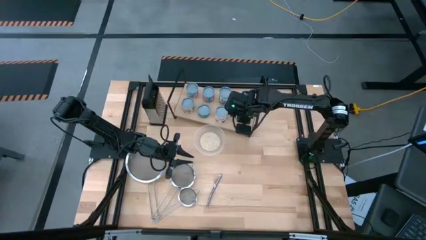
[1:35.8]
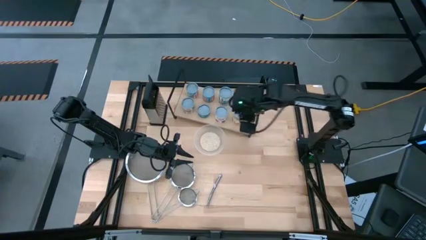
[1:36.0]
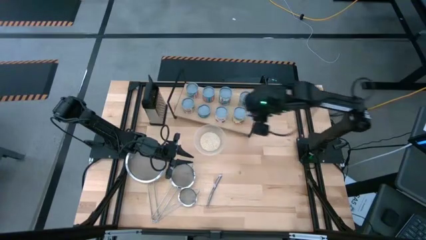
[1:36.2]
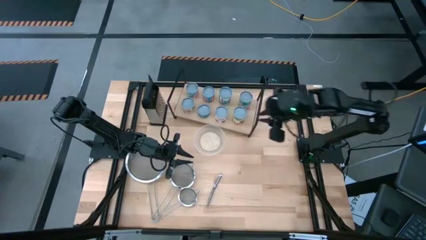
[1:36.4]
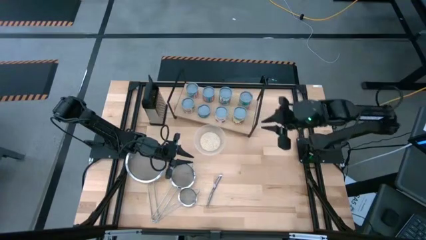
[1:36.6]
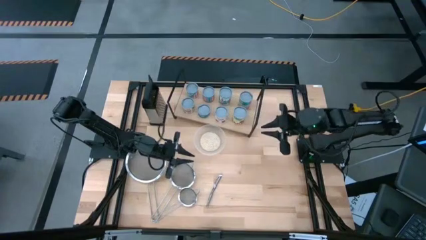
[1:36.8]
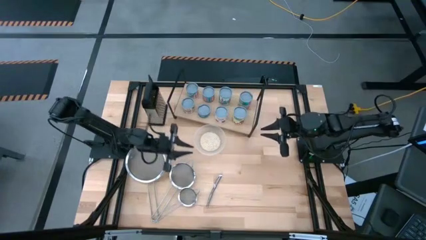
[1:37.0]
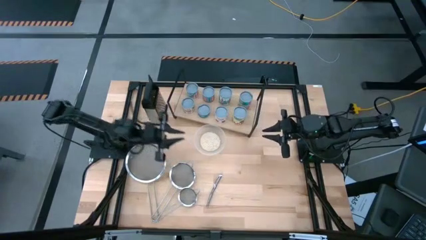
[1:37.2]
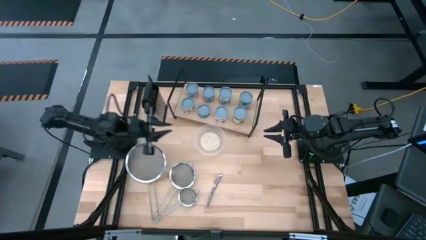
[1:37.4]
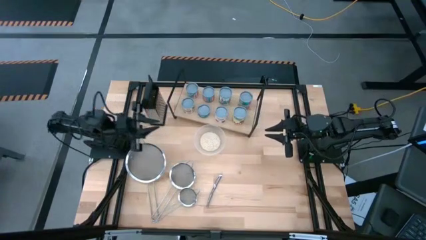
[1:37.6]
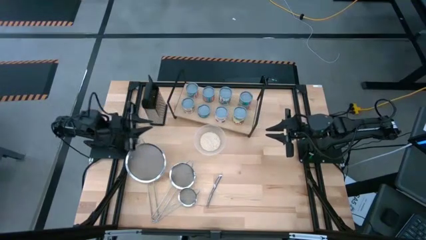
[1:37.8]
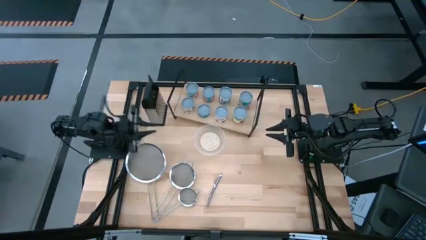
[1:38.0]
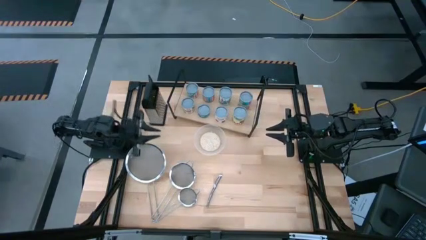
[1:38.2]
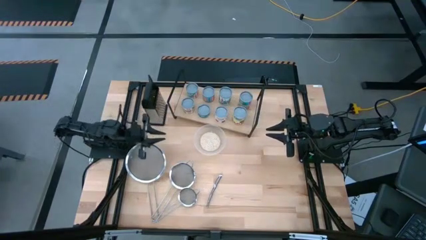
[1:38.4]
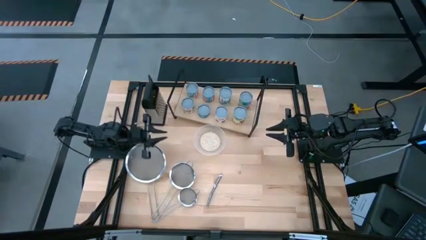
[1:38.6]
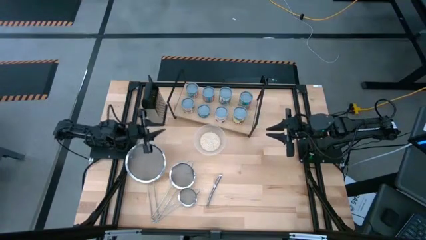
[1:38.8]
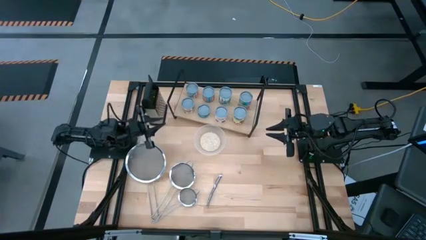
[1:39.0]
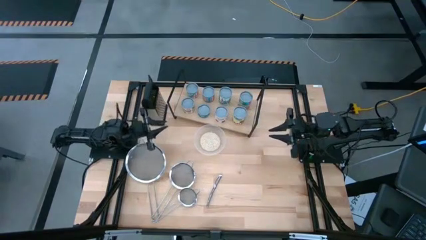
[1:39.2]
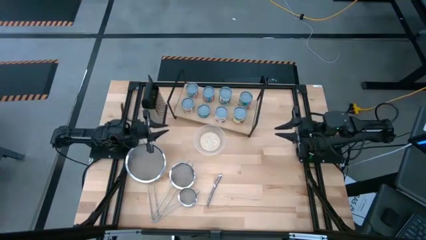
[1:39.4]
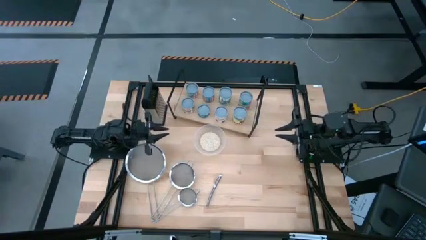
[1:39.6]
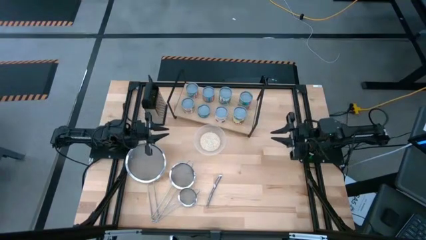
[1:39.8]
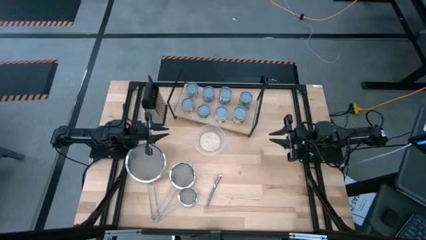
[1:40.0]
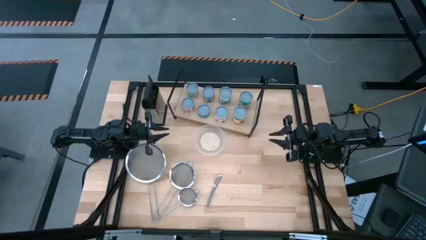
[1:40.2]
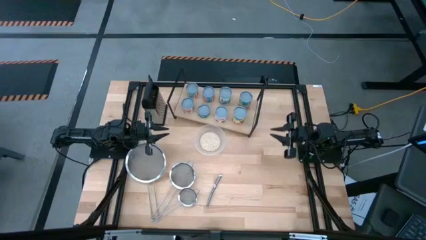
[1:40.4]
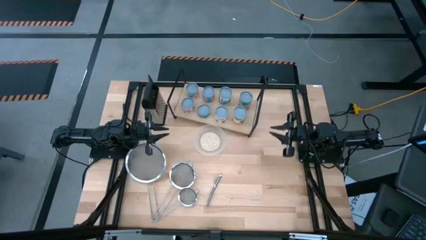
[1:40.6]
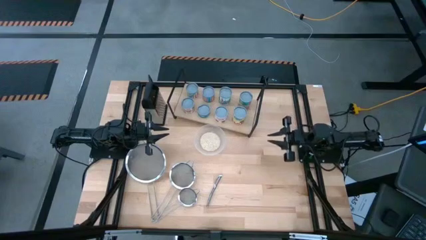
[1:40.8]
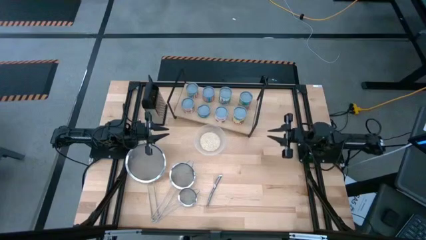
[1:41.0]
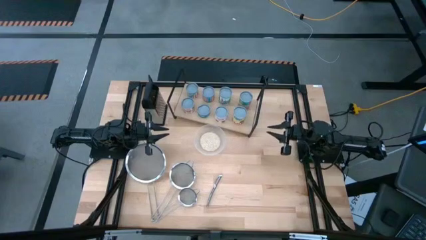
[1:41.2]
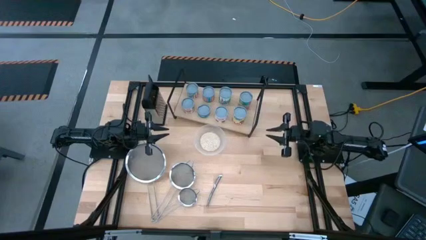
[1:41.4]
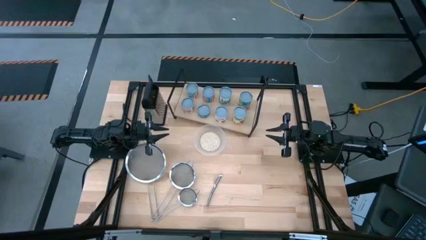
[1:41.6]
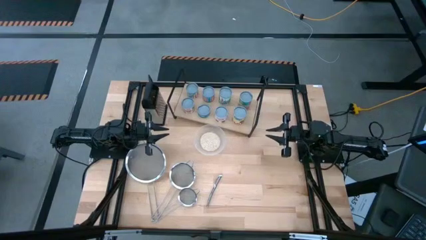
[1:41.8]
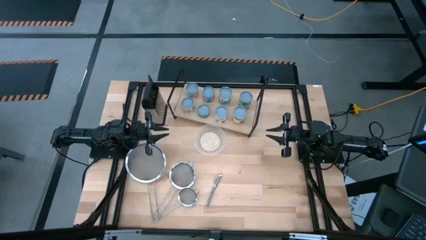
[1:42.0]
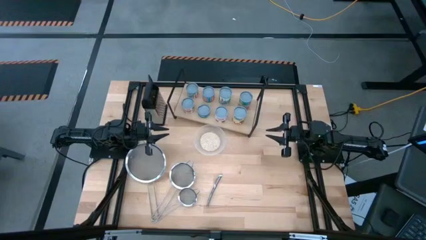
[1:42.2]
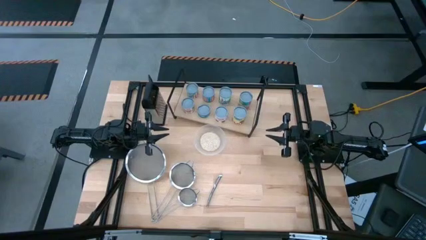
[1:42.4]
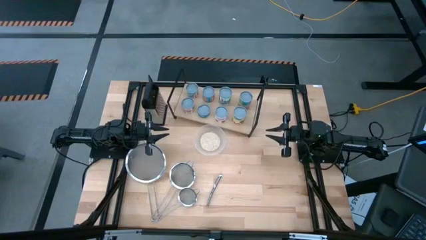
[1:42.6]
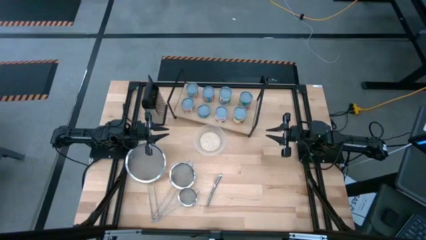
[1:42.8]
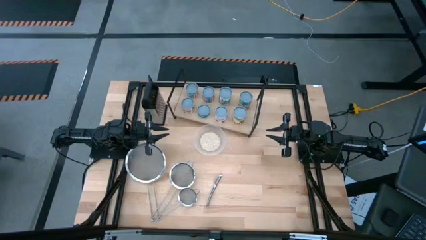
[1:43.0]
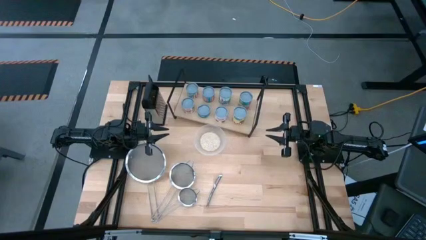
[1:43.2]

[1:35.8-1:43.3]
Task: Pick and place cans onto a shelf
Return to Home Position

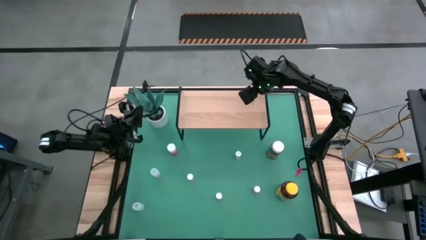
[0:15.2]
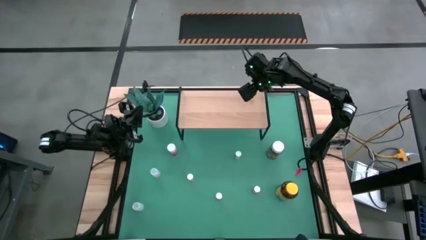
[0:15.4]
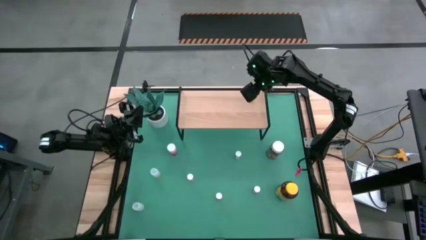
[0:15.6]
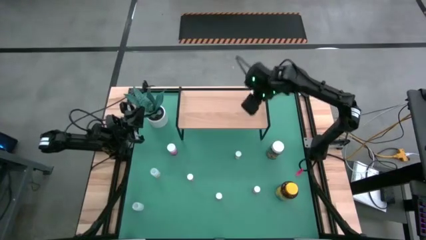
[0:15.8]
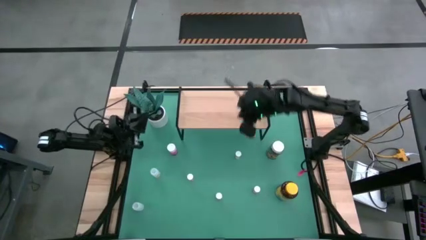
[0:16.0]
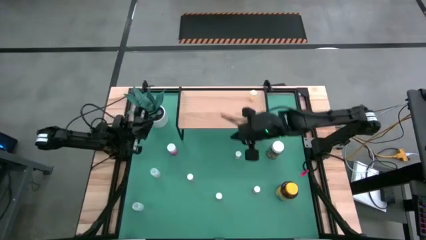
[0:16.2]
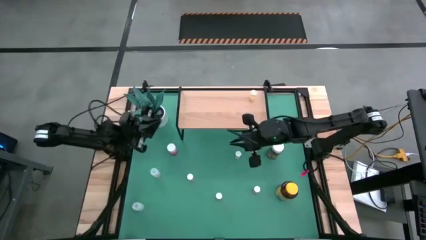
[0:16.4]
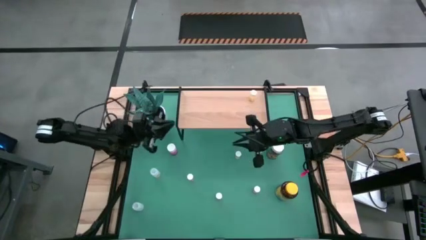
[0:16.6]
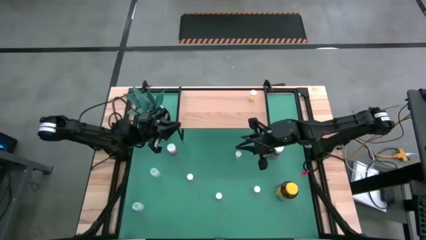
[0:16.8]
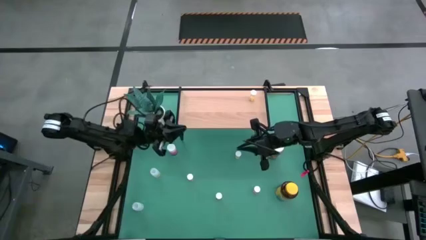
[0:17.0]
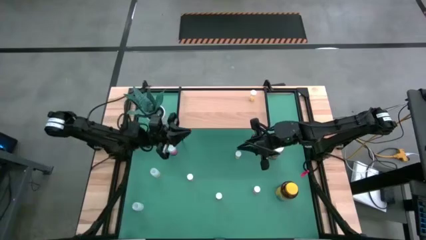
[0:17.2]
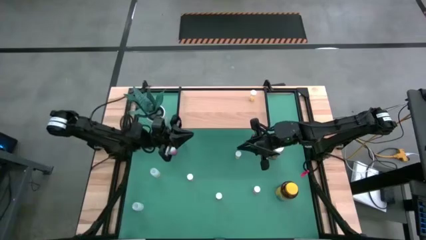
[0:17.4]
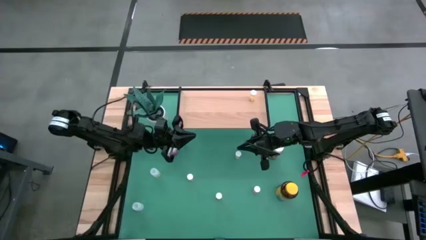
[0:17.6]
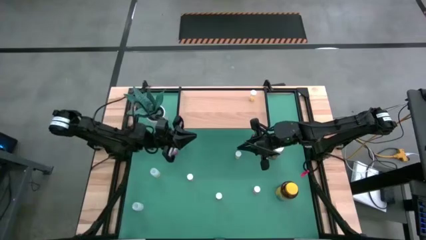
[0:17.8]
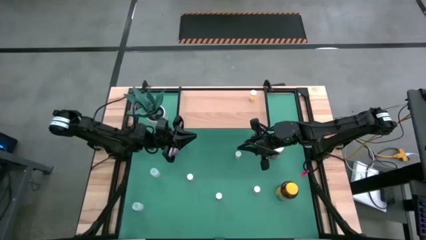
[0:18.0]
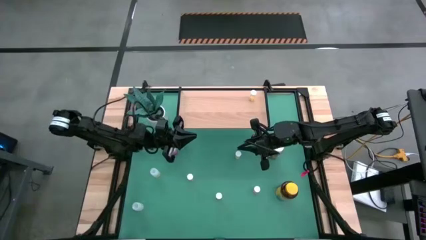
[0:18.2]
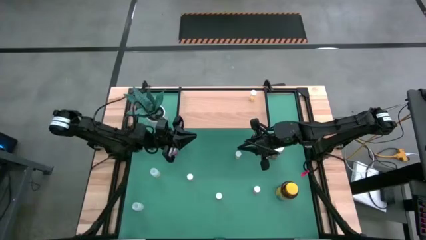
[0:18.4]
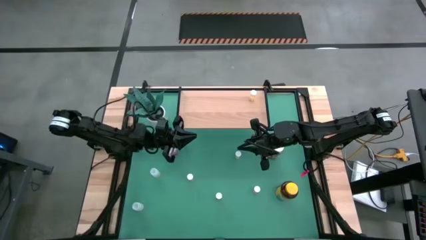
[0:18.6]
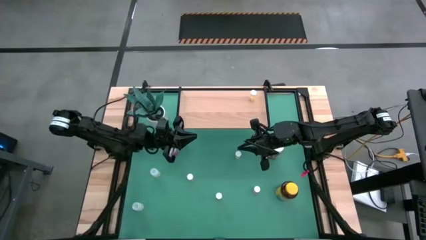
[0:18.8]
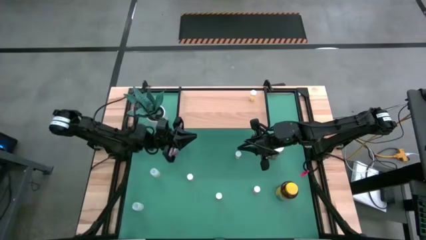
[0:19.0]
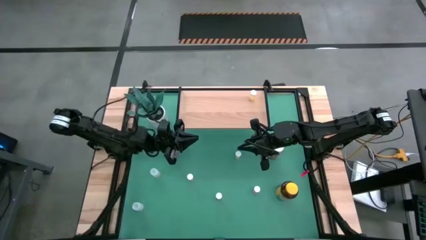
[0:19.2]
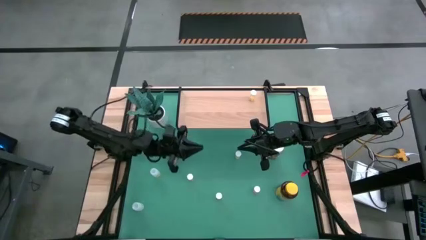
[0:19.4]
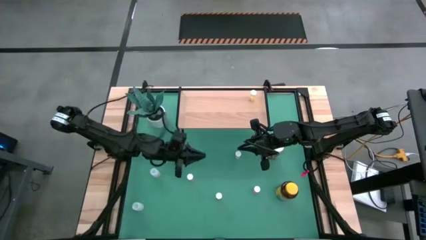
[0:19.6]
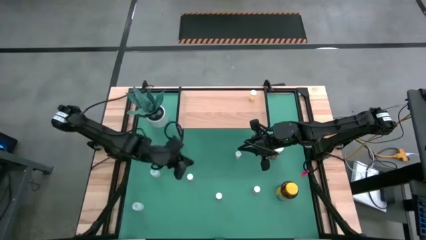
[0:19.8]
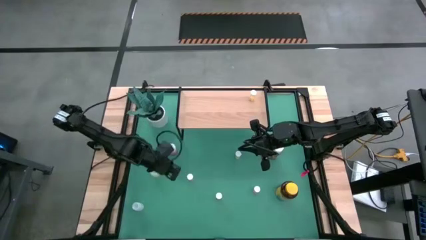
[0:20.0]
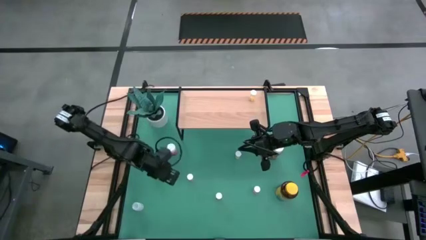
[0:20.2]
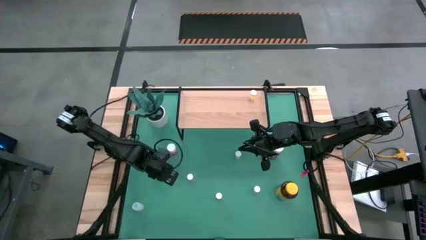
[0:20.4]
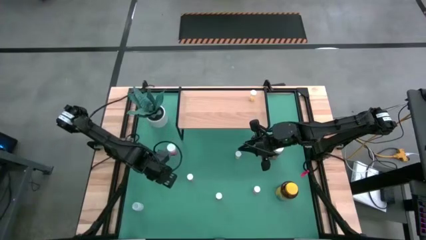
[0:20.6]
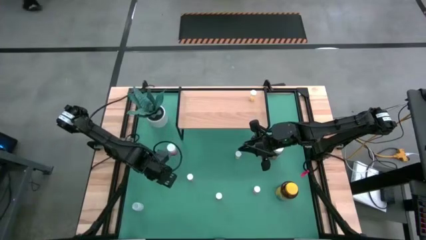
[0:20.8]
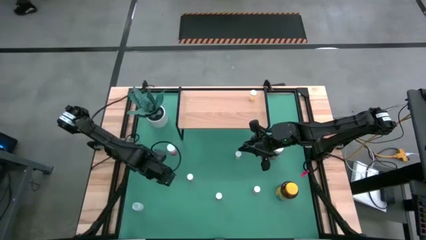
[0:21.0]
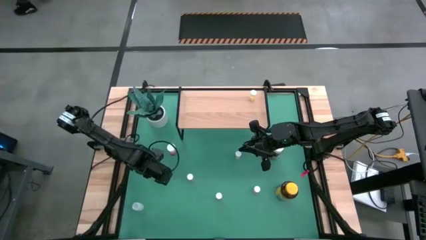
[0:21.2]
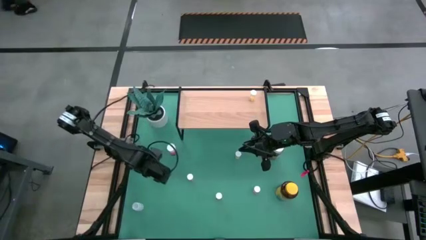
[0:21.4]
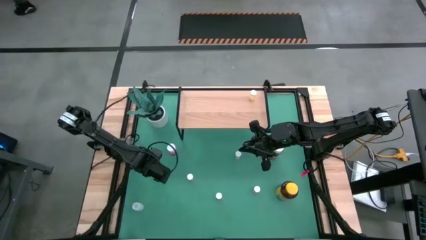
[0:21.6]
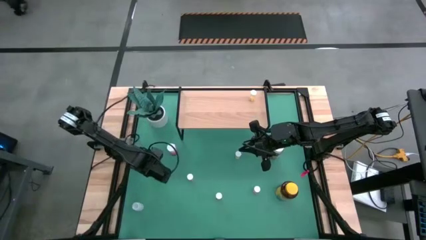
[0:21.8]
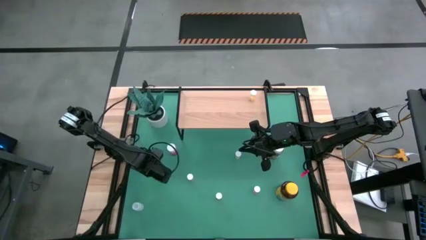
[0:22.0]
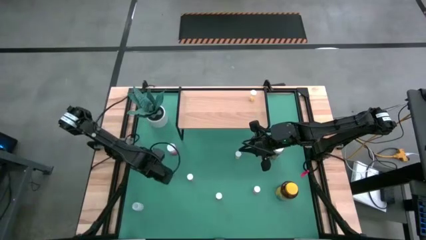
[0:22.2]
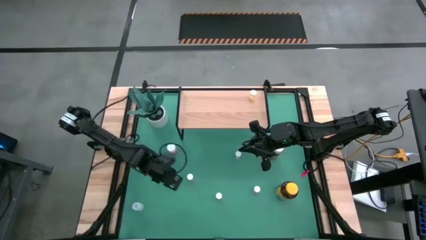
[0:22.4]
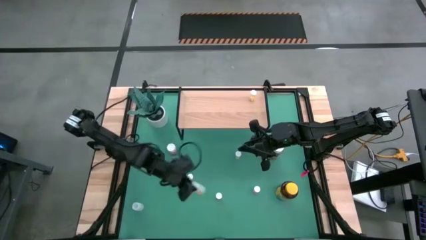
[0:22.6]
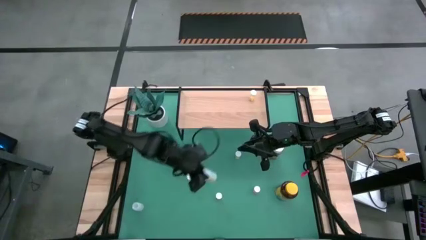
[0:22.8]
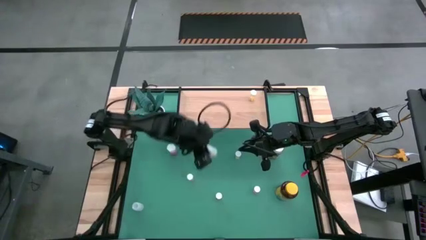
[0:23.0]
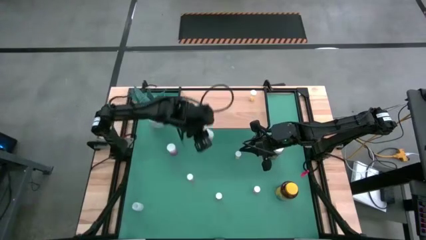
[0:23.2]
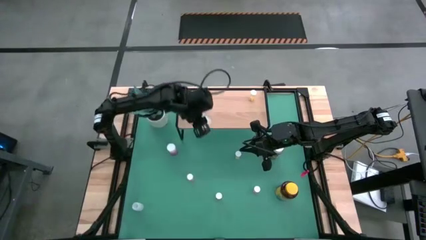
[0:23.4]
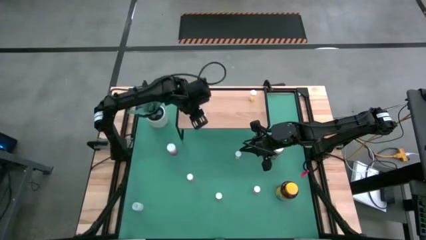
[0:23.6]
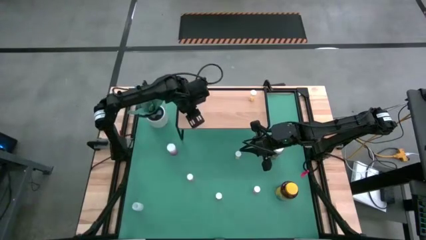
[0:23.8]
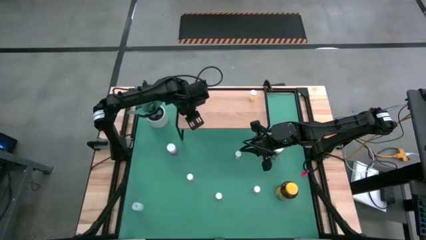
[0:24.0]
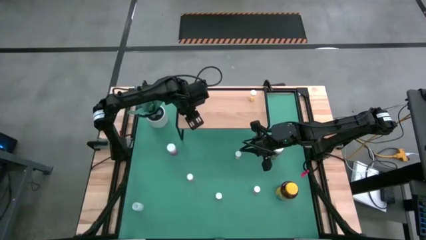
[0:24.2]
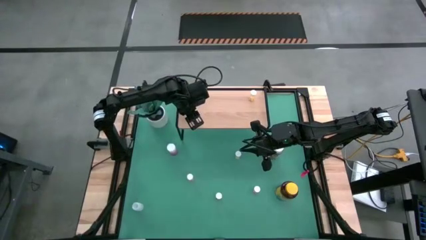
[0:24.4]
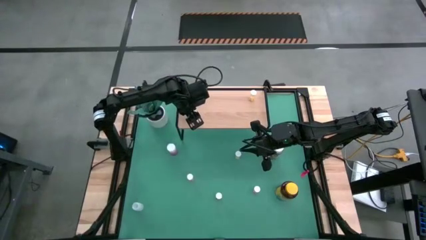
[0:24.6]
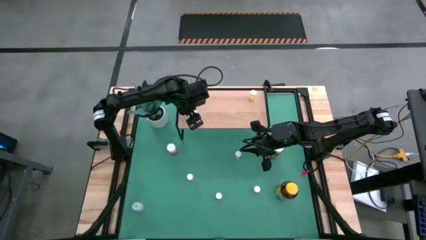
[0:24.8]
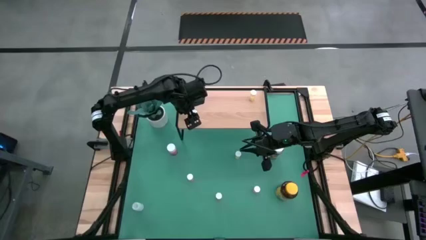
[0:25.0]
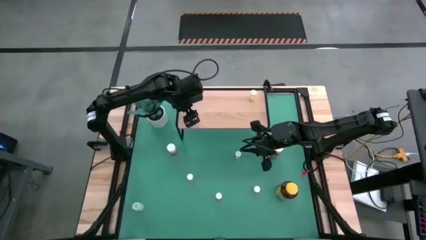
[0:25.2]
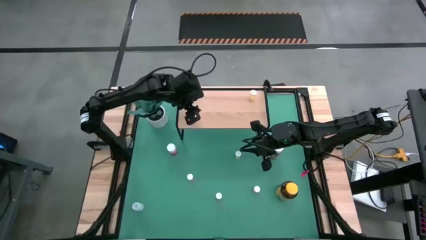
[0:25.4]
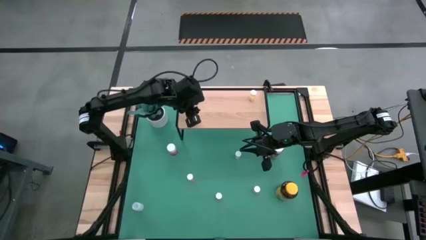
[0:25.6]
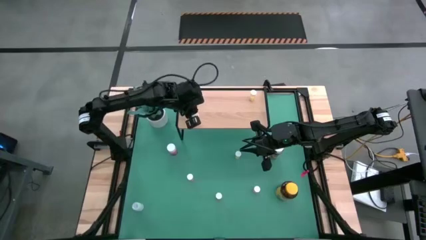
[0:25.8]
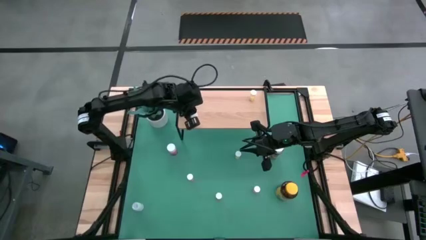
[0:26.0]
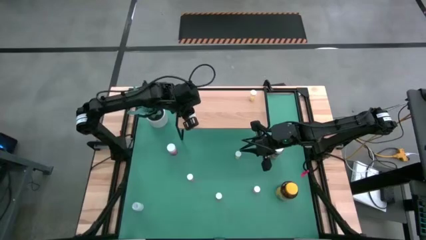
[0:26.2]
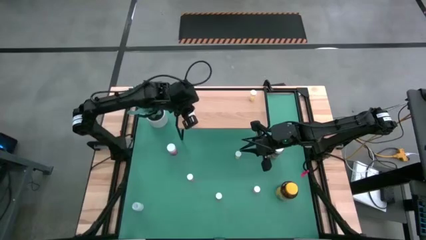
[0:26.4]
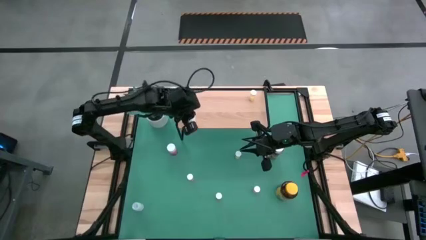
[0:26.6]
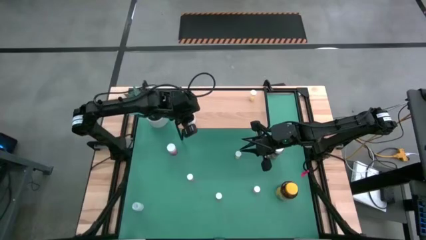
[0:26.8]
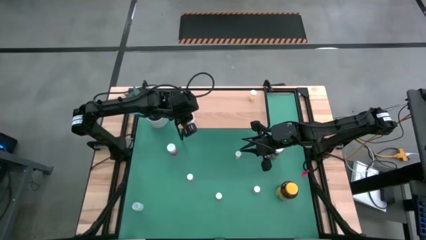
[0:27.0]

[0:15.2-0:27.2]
Task: Pick and place medicine bottles onto shelf by color
Put the top white pill bottle on the shelf
